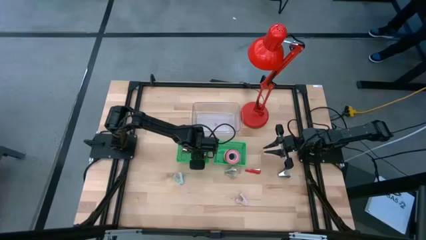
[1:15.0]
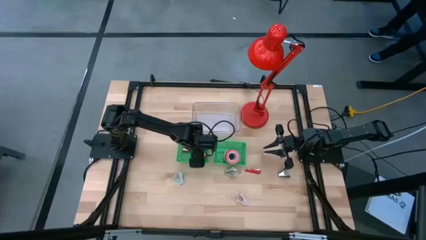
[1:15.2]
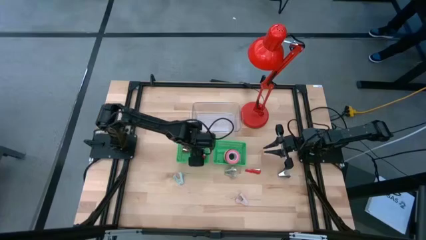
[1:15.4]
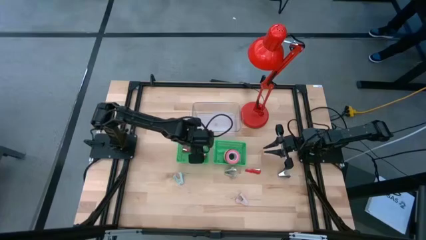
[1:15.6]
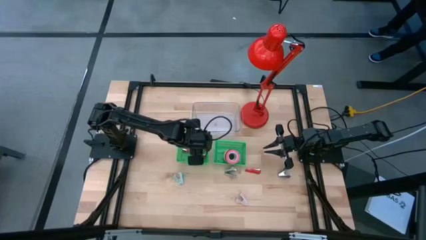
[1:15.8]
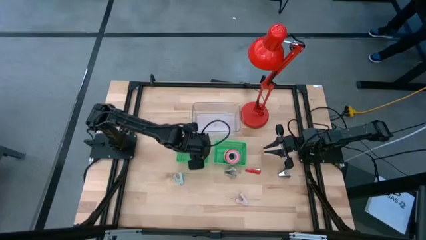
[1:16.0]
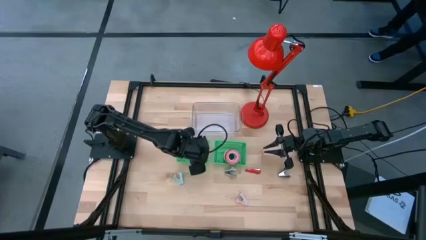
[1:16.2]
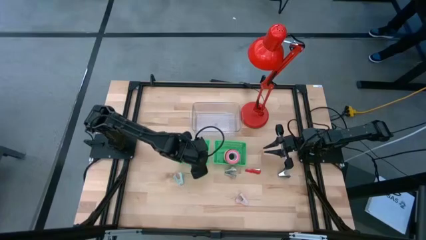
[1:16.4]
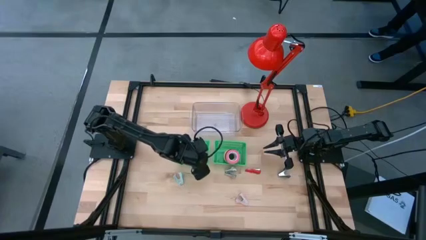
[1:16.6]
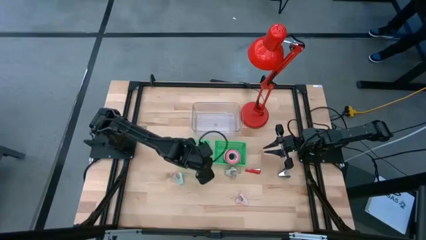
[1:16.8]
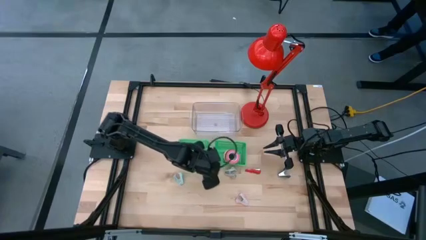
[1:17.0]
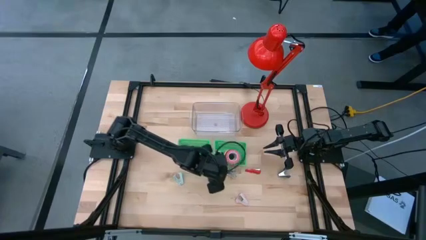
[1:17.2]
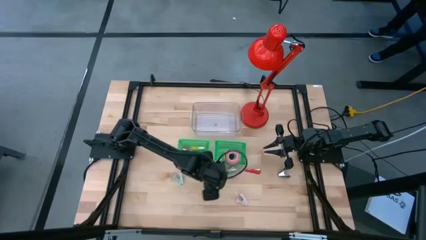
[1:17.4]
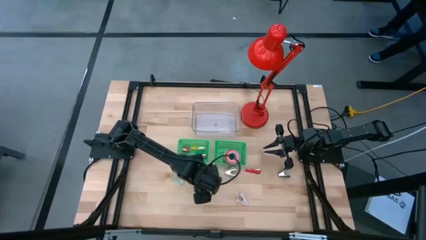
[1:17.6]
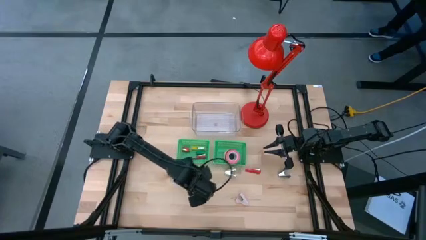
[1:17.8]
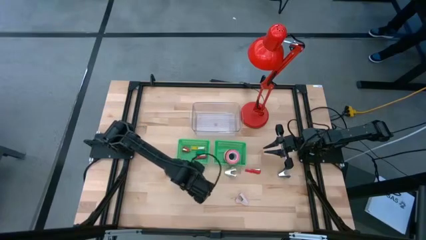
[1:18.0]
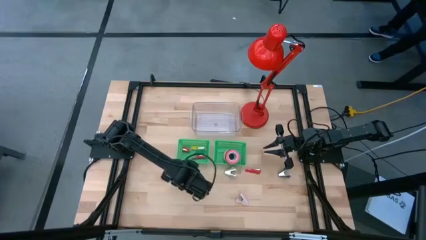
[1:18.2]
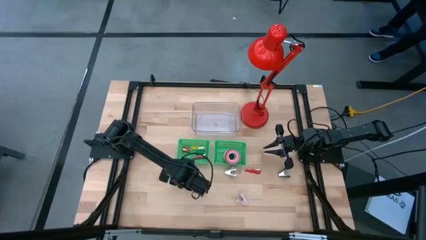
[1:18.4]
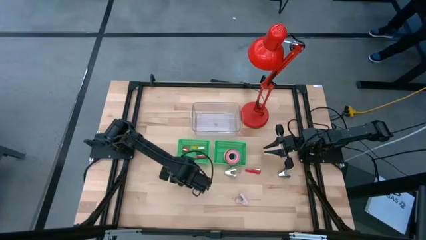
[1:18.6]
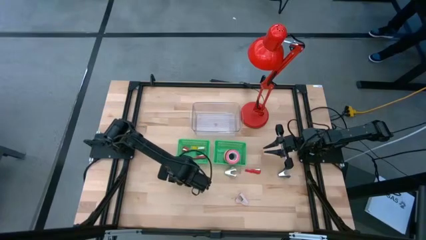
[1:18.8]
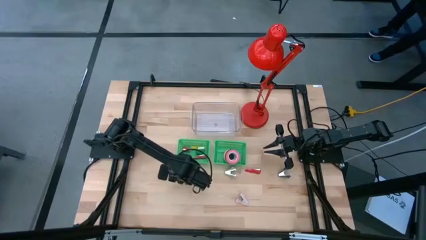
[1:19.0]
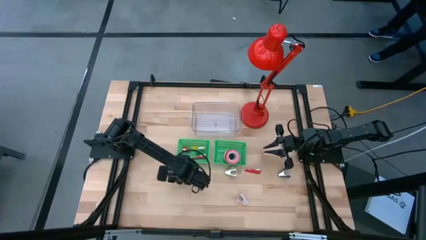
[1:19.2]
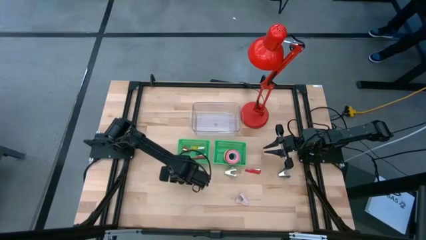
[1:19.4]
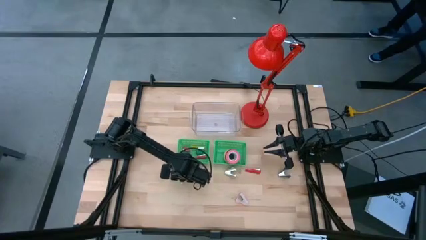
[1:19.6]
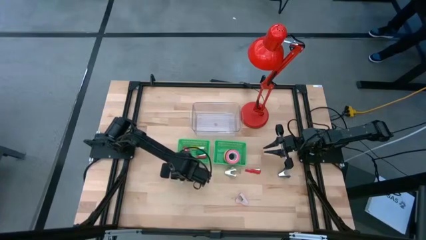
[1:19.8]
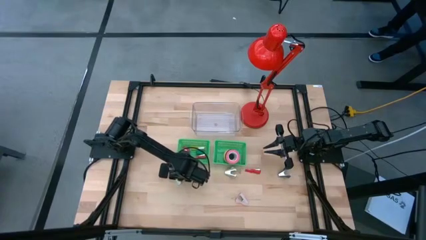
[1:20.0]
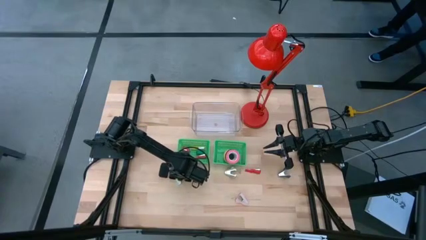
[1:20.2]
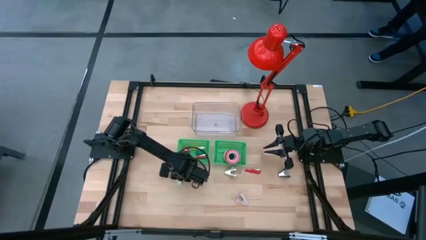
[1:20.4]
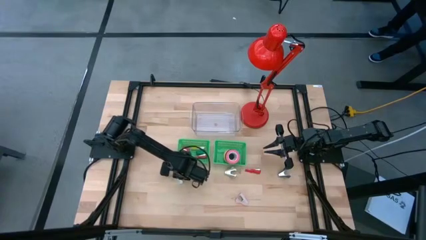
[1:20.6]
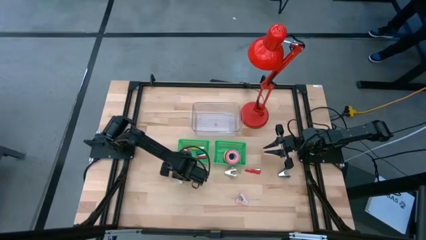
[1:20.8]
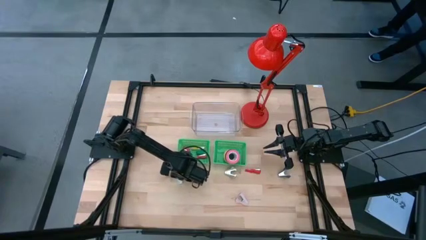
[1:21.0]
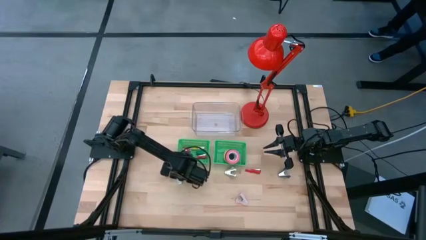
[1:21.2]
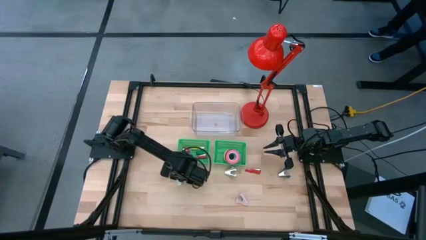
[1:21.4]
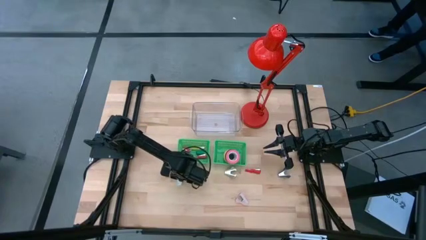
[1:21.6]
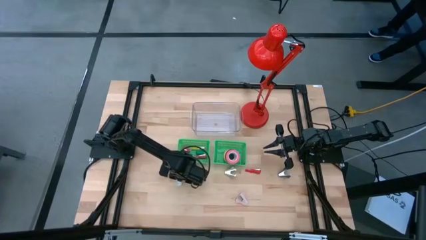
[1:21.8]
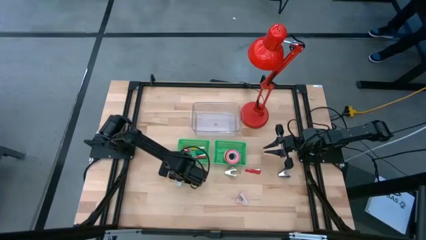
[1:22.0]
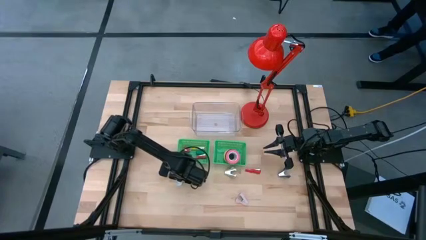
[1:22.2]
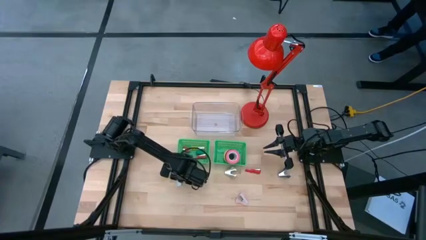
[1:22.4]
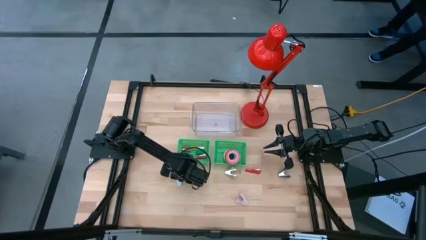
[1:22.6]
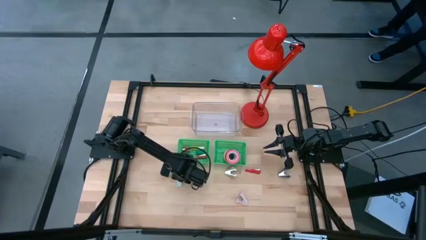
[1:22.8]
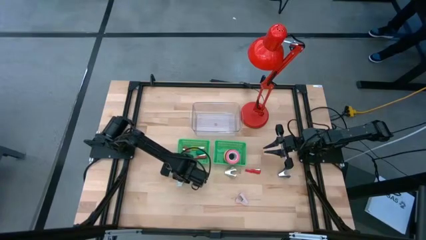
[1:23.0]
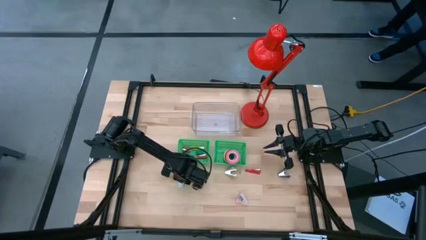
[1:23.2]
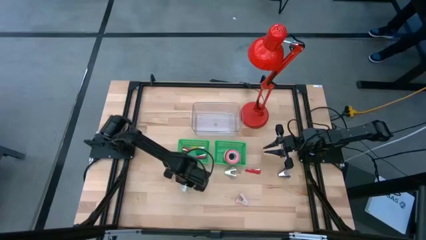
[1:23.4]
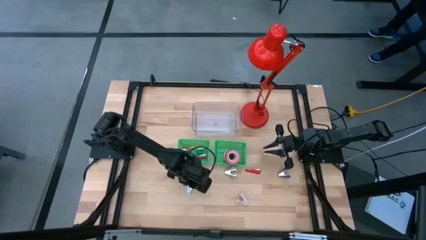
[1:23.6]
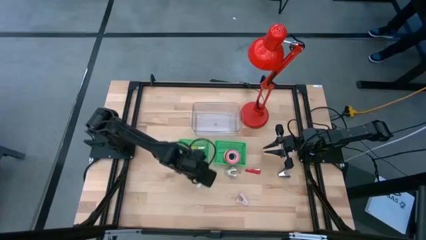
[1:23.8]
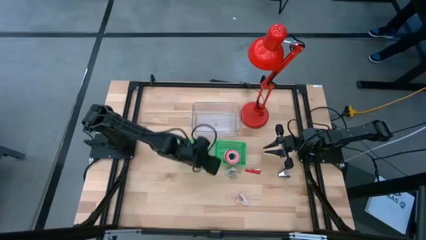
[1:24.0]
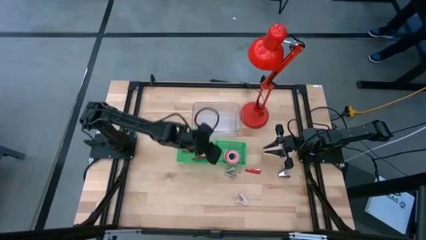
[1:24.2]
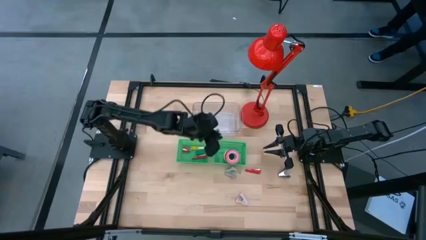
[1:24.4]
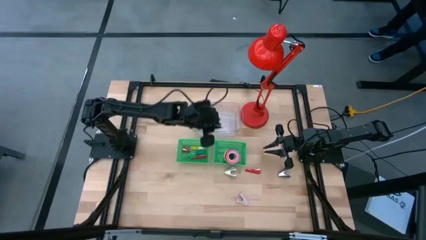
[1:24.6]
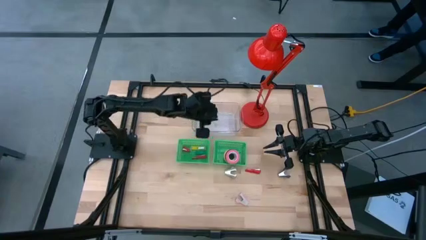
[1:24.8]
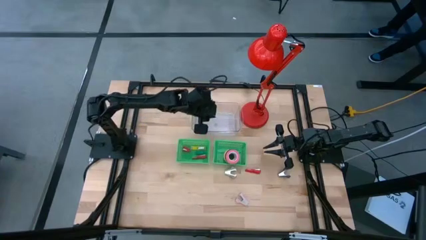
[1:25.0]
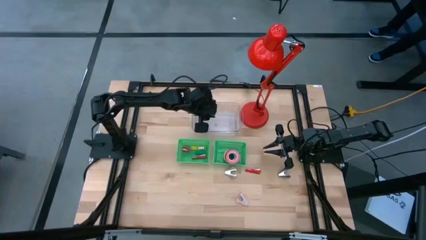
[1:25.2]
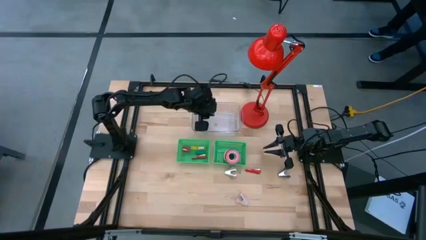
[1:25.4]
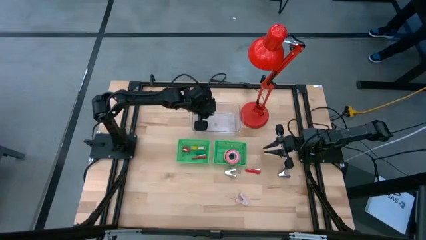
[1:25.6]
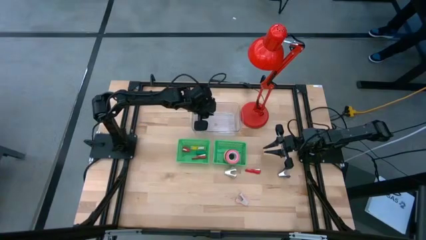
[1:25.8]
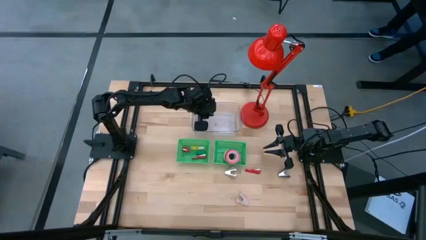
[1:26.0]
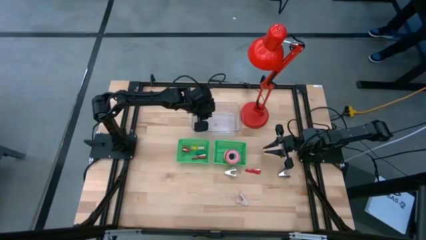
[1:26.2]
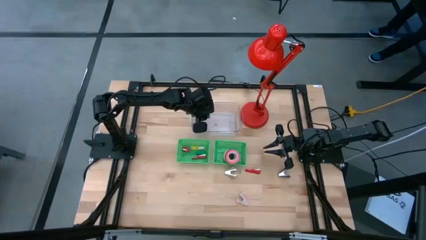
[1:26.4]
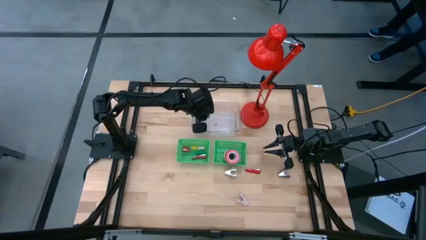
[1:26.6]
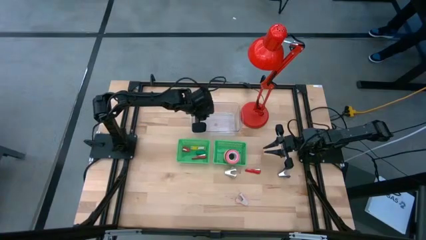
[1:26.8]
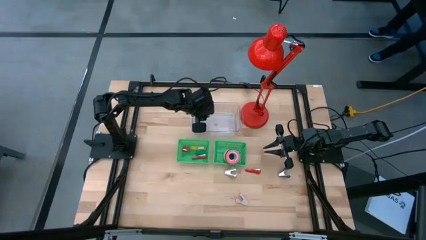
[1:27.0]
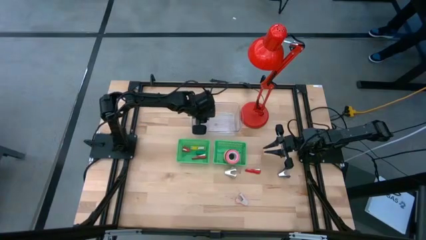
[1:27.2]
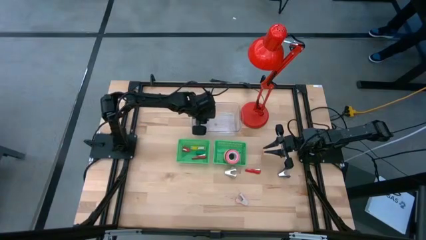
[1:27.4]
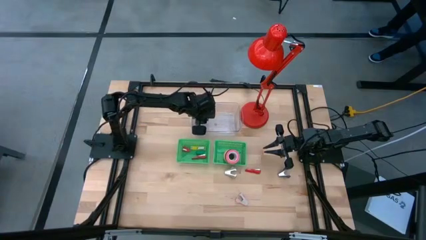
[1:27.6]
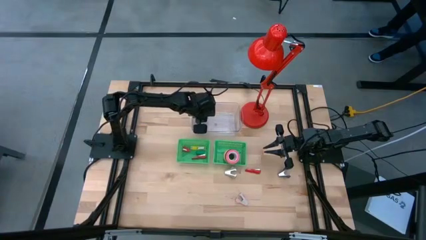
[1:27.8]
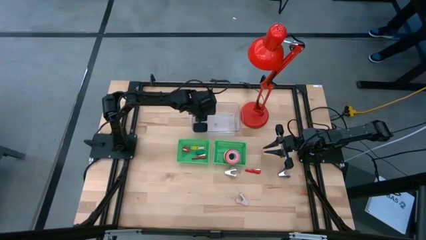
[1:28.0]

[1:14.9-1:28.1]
Task: Pick and place Stapler, Stapler remover, tape
Put the light blue staple remover into the transparent bin

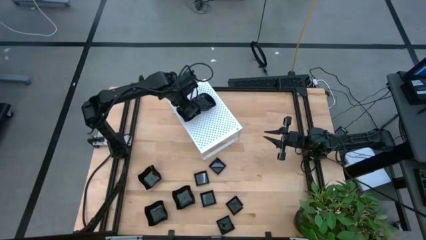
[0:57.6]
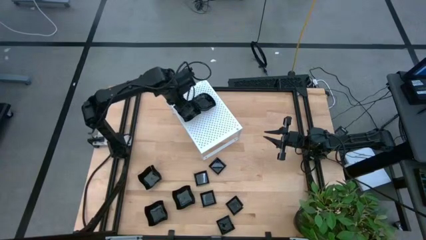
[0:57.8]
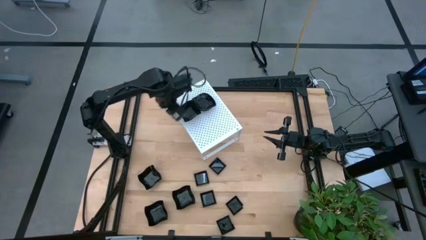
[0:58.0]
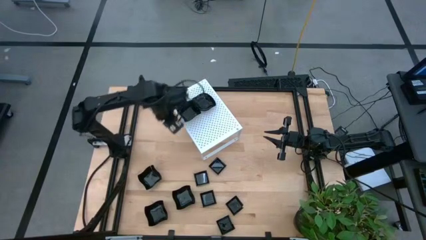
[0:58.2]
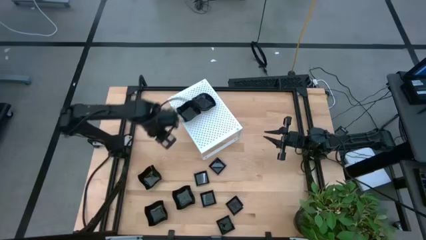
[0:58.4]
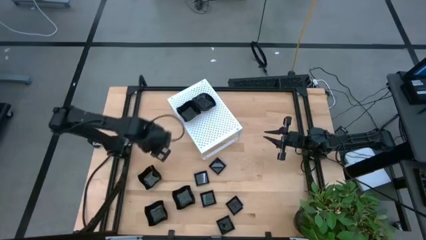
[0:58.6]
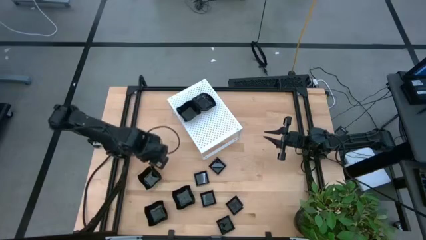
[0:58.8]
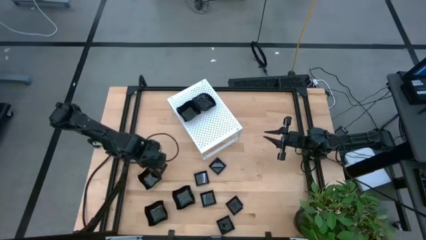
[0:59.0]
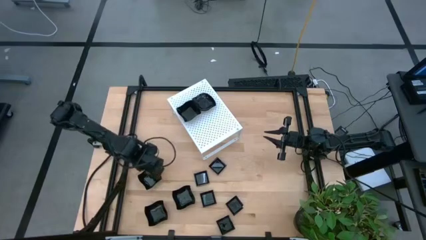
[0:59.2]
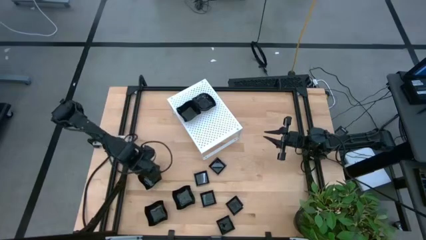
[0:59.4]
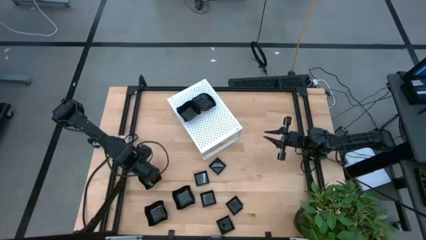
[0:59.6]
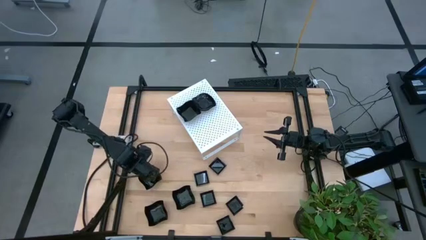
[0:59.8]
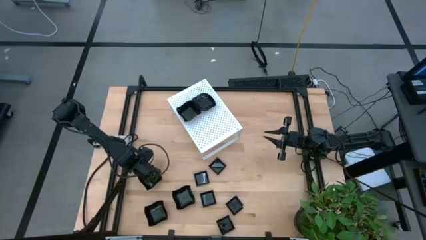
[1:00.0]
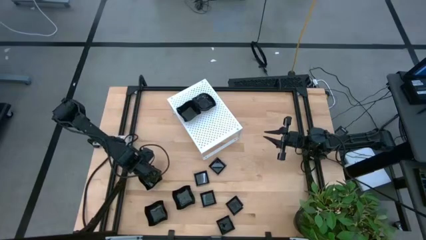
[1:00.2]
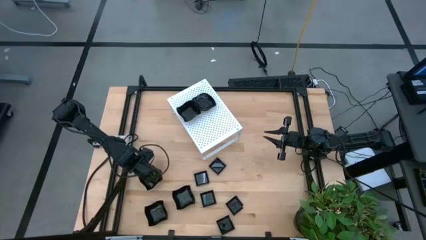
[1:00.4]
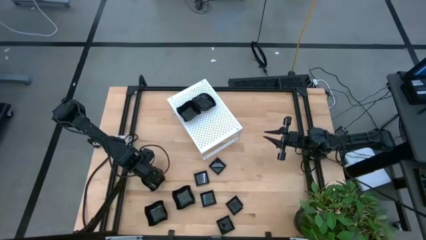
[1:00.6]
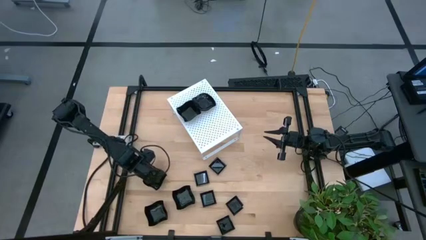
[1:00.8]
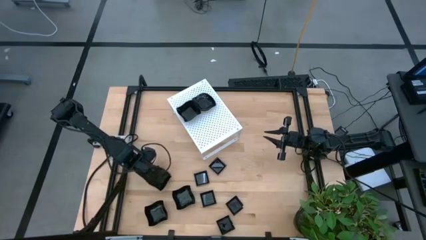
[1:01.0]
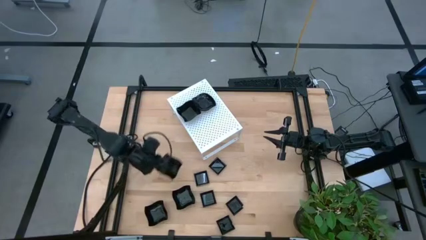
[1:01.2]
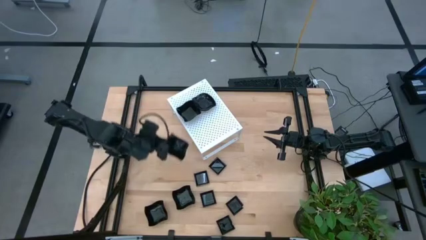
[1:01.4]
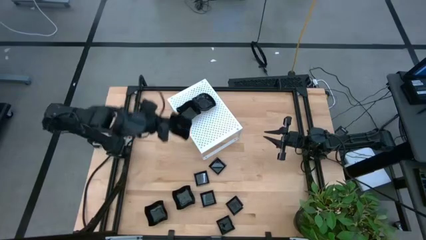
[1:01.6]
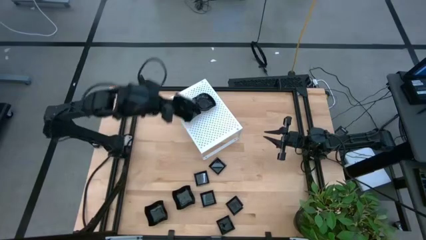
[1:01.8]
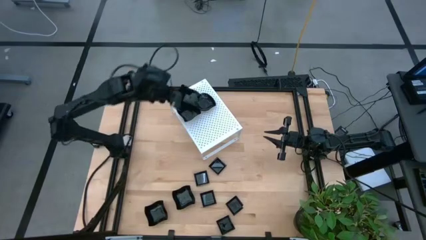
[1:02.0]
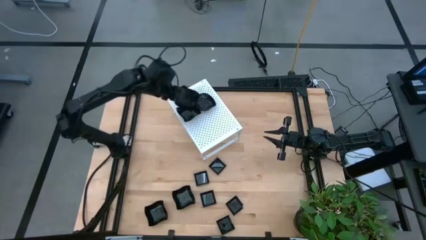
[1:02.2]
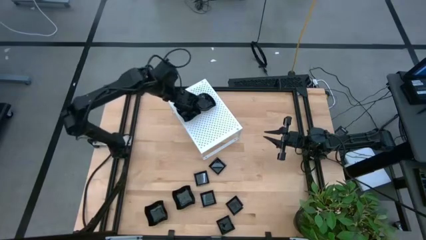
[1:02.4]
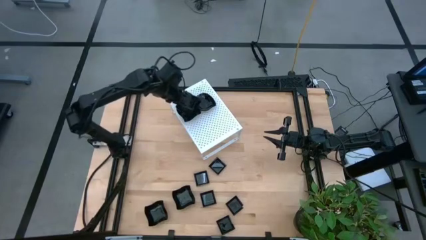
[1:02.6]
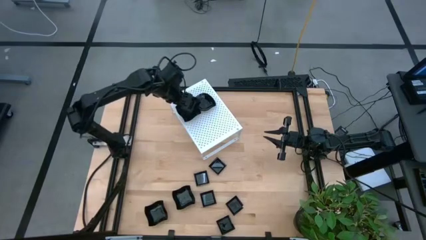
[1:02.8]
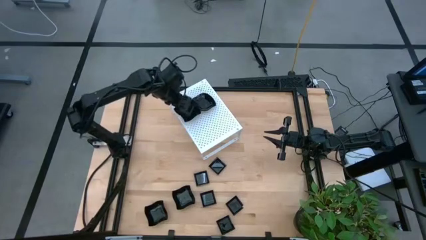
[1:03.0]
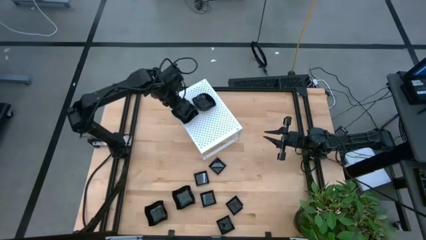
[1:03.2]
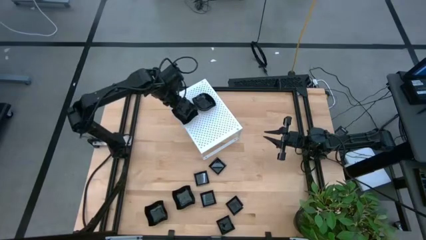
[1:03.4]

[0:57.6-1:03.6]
Task: Pick & Place Mini shaped plates
Stack the distorted square plate on top of the other distorted square plate on the shelf
